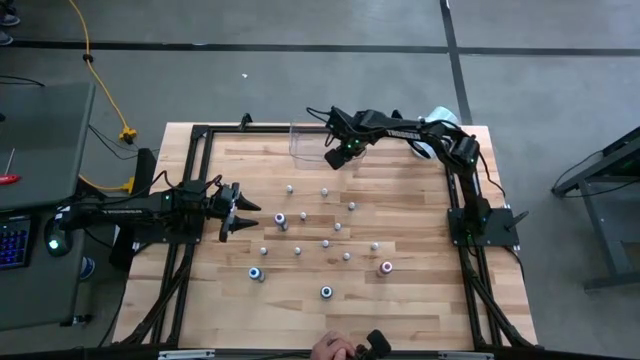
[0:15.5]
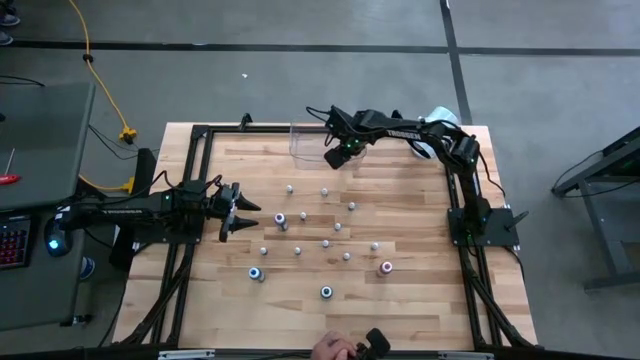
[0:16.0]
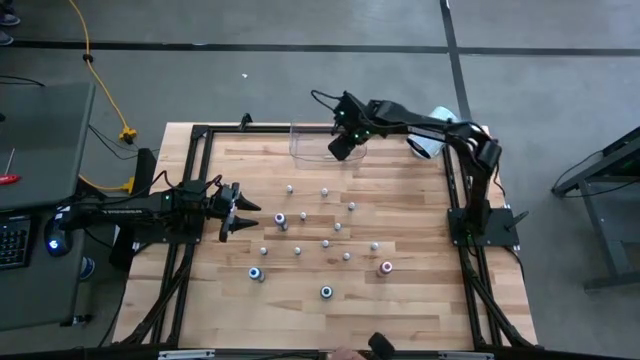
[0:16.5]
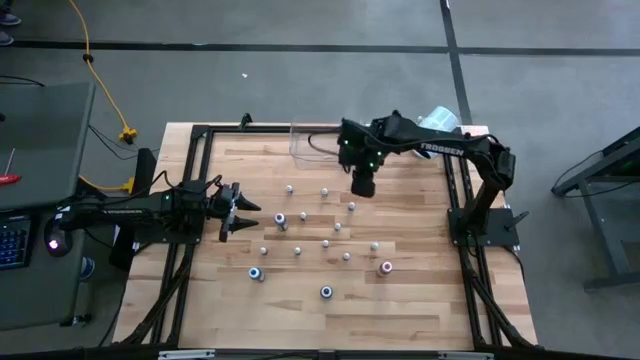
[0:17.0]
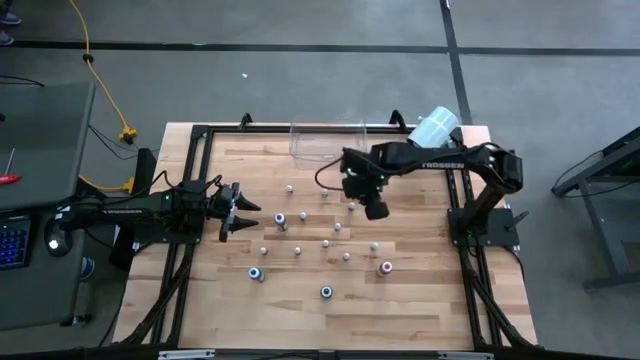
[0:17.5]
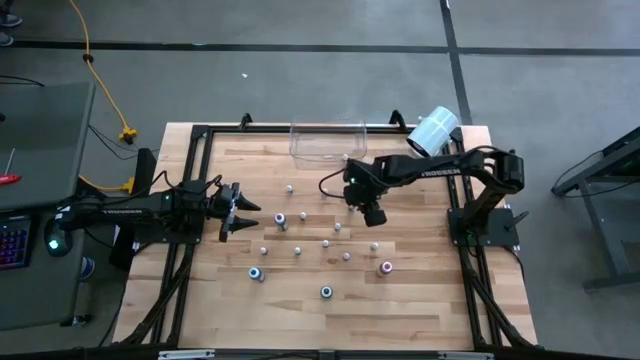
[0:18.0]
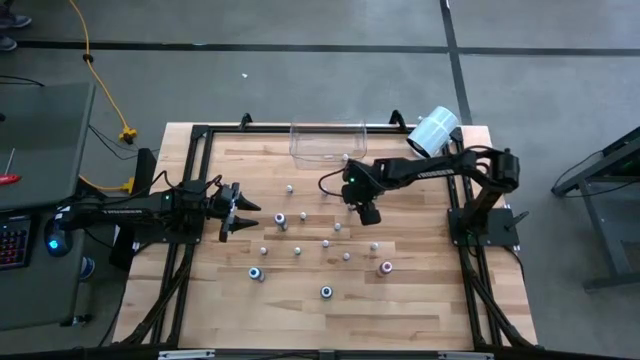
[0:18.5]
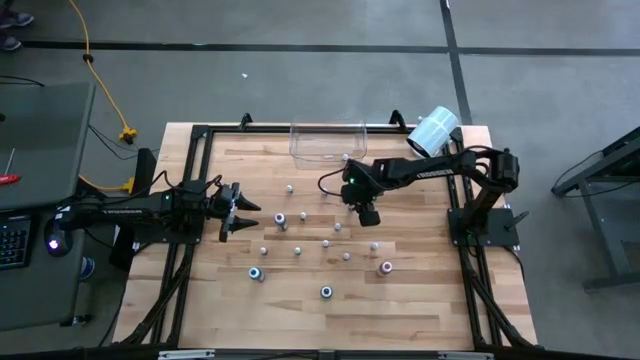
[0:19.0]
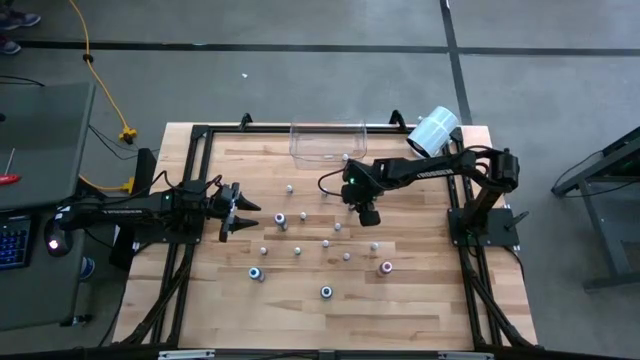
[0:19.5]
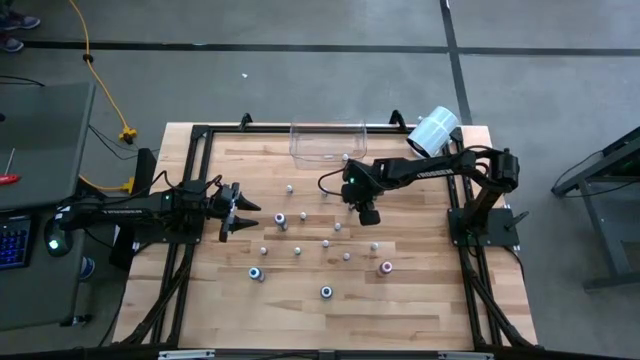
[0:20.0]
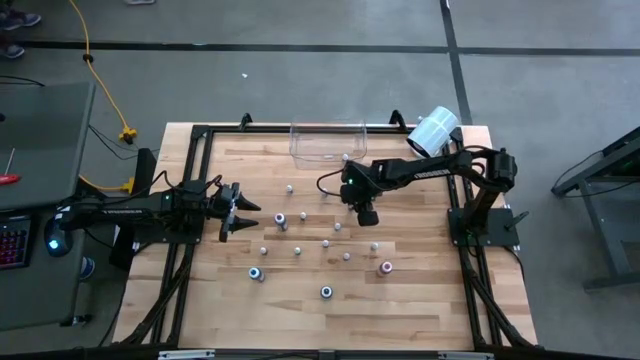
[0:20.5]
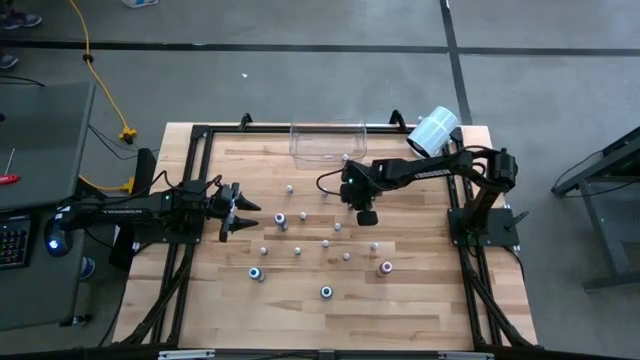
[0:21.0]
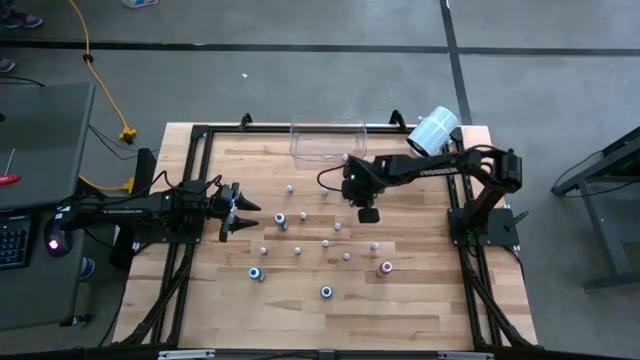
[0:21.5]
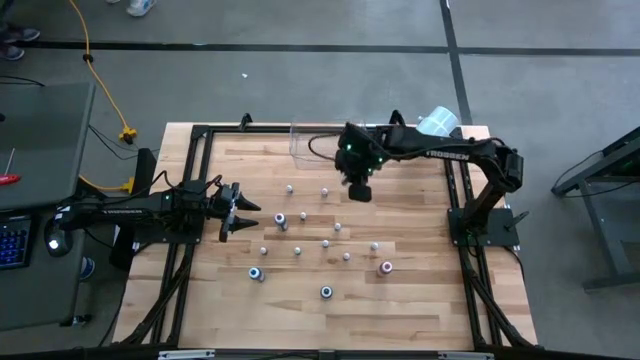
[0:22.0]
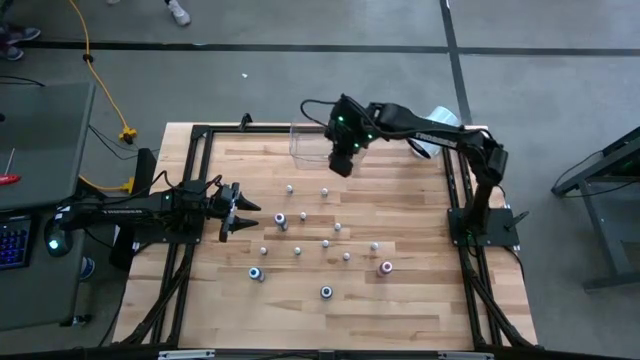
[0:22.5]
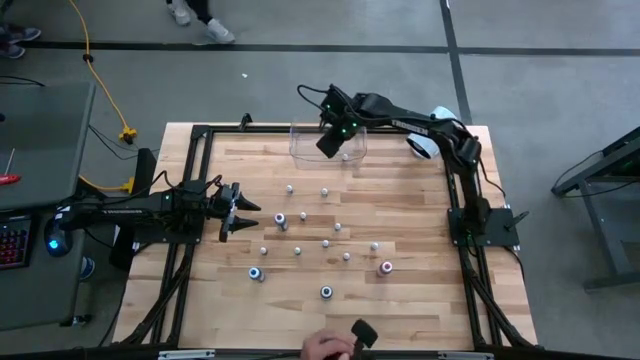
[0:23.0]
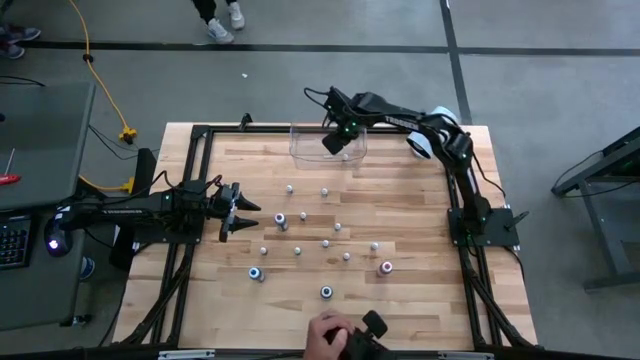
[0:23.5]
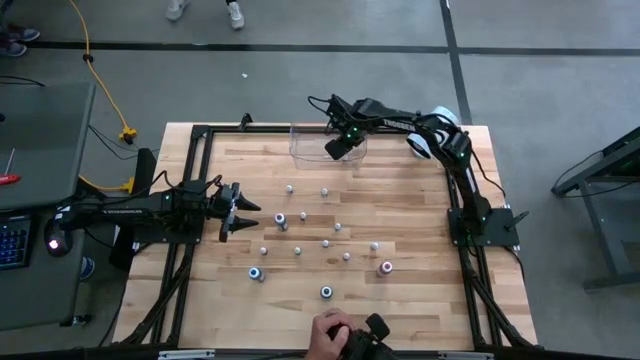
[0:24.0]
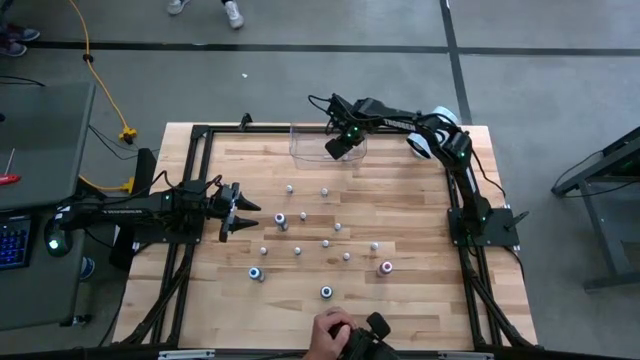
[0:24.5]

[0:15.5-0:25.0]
Task: Pick & Place food coloring
Put the small blue food coloring into the transparent container

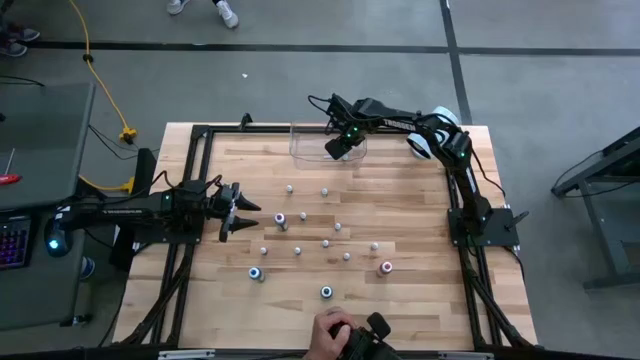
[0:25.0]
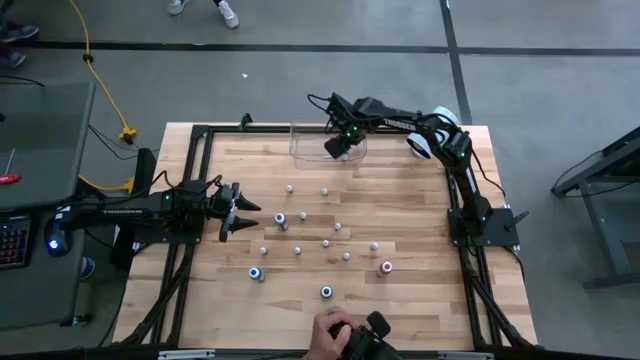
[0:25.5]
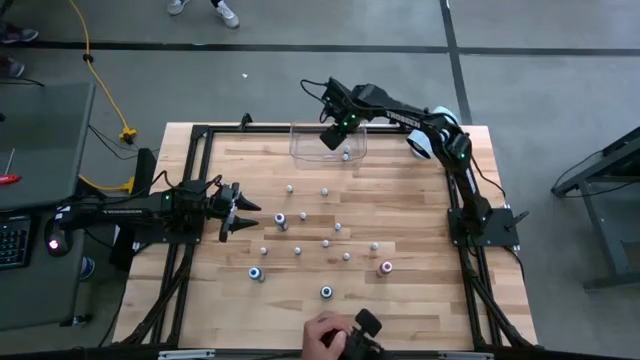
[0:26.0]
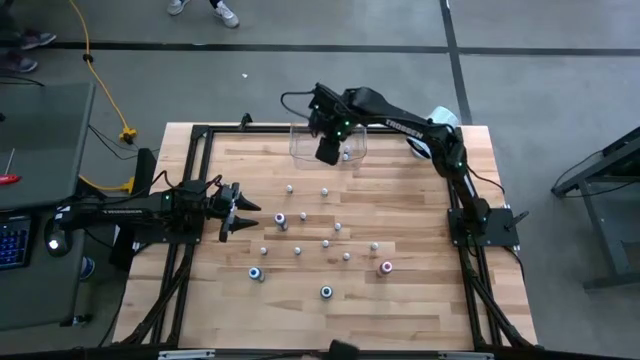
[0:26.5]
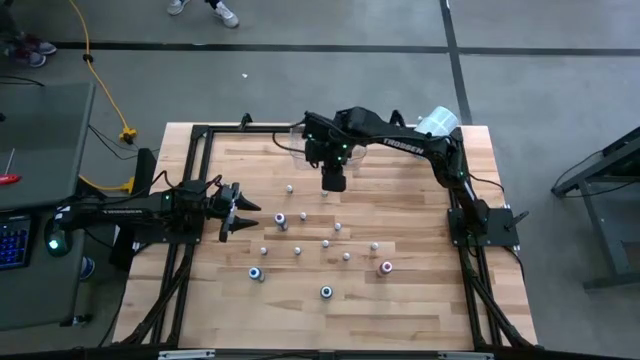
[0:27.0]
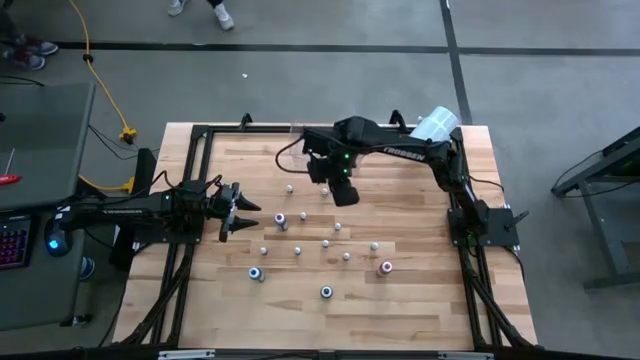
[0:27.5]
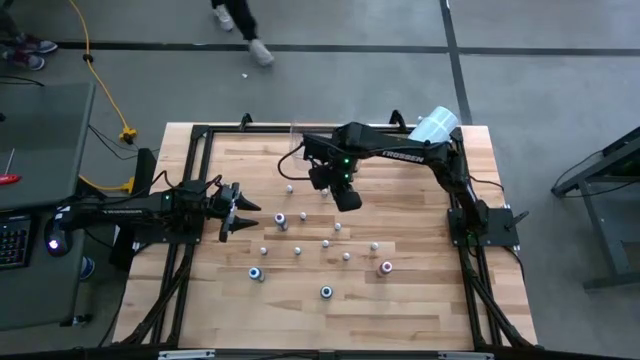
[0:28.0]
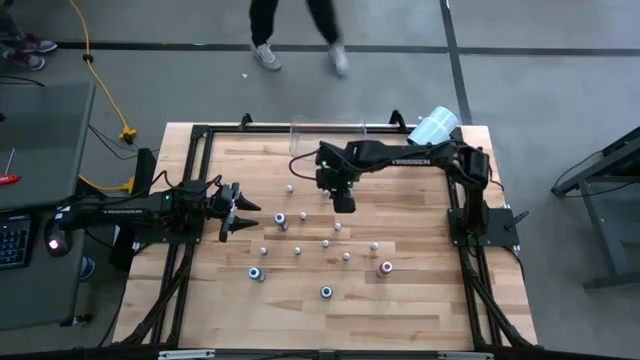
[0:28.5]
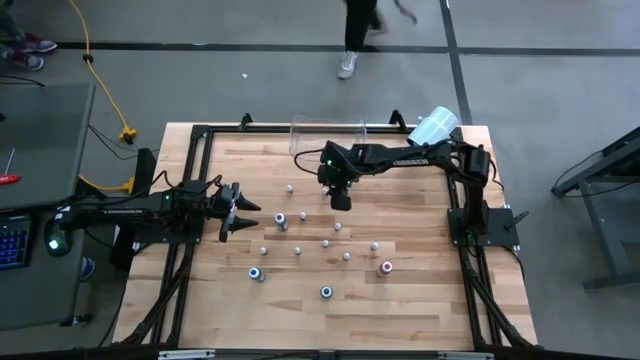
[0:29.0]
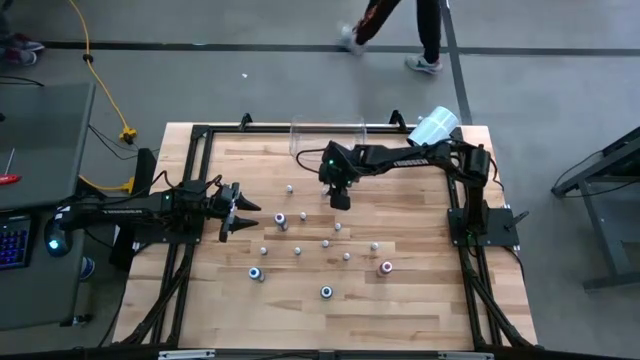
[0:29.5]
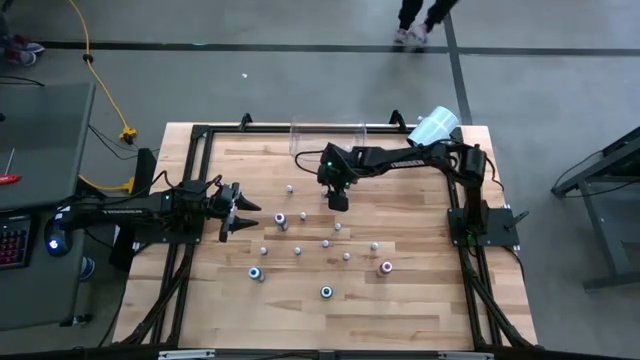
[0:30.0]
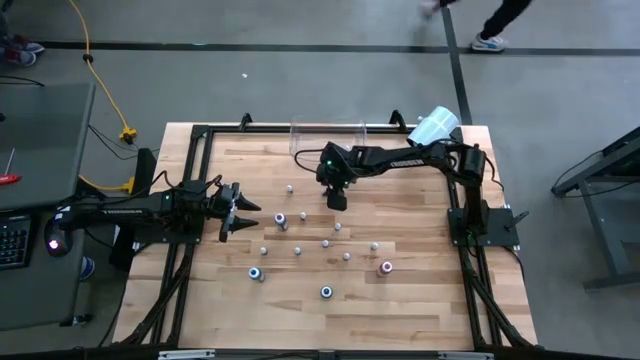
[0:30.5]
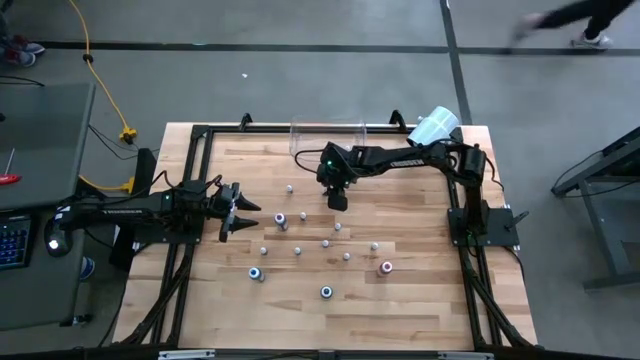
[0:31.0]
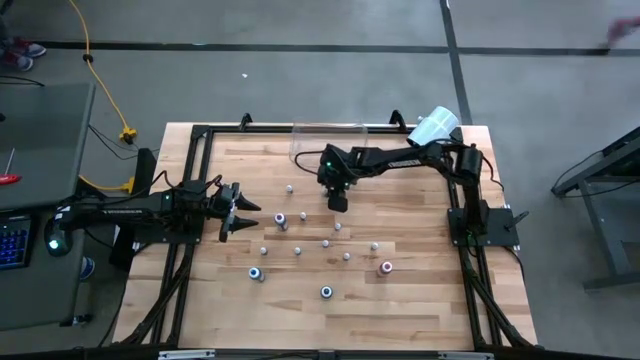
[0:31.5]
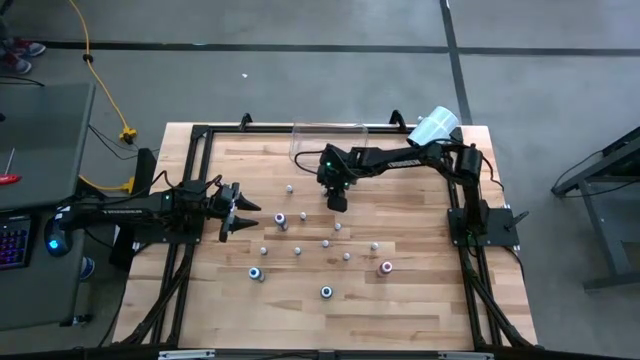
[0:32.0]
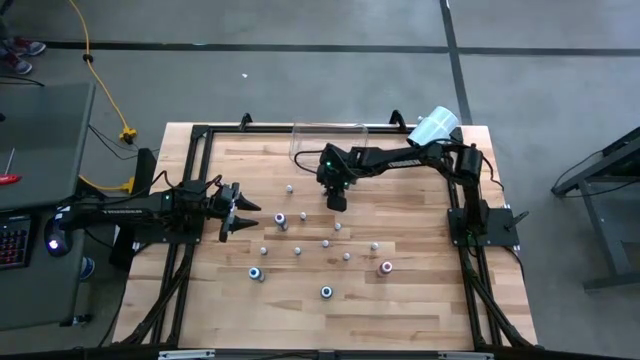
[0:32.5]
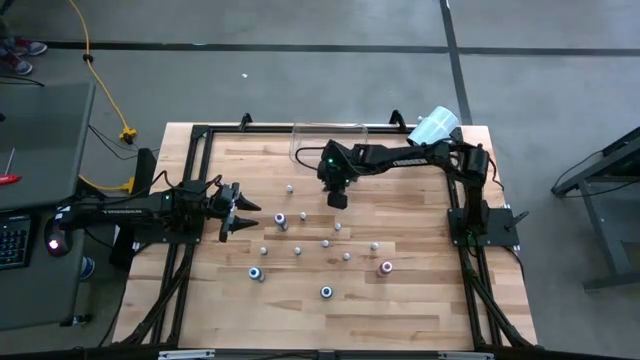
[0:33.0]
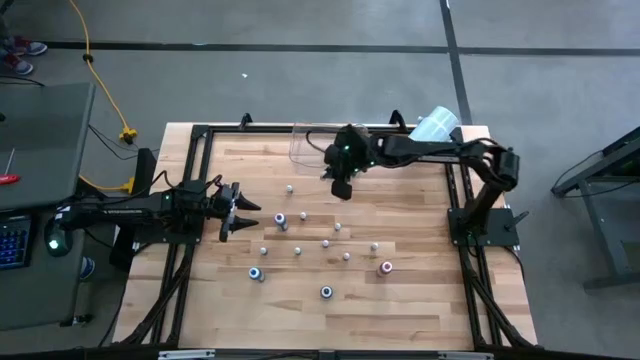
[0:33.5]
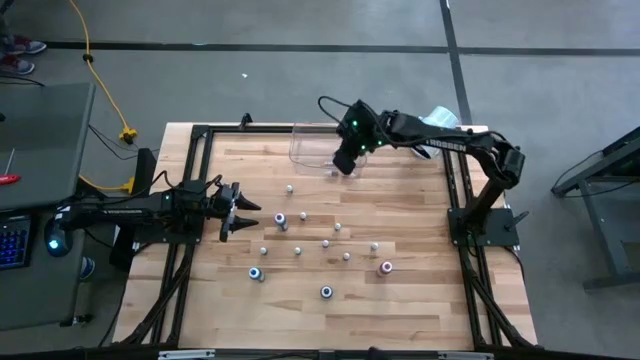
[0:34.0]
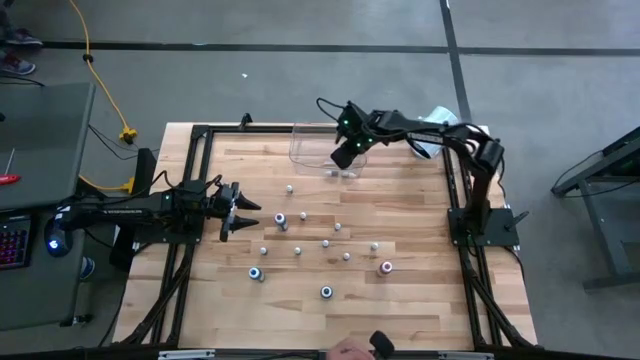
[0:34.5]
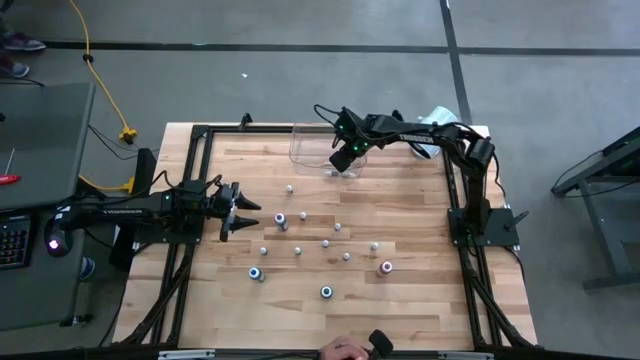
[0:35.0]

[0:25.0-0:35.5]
Put the small purple food coloring into the transparent container

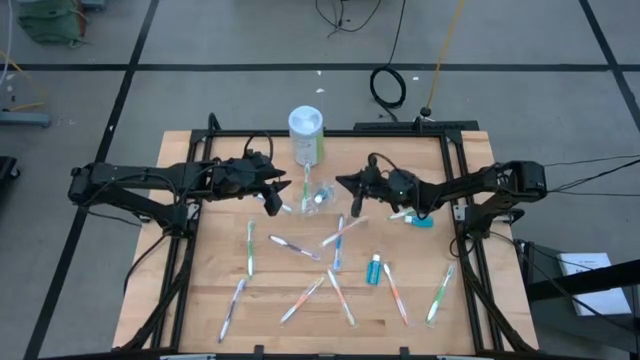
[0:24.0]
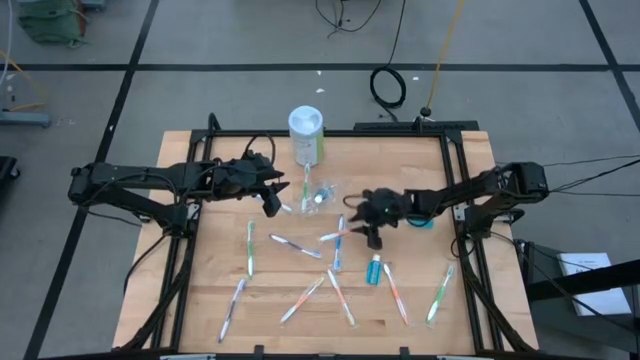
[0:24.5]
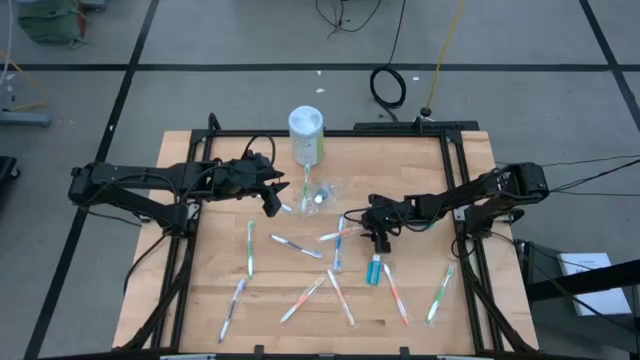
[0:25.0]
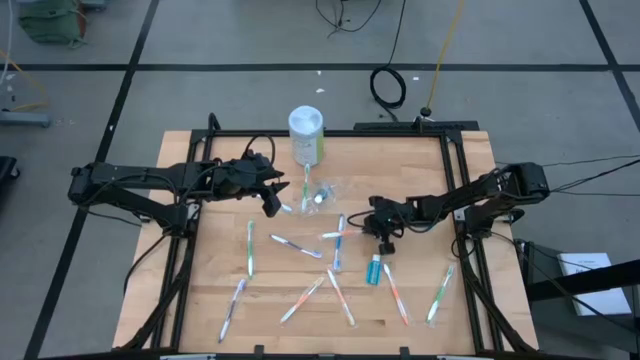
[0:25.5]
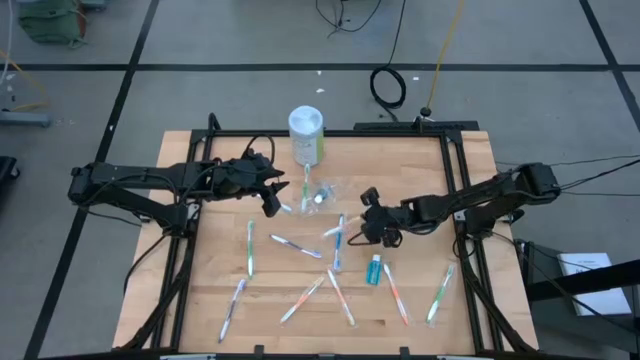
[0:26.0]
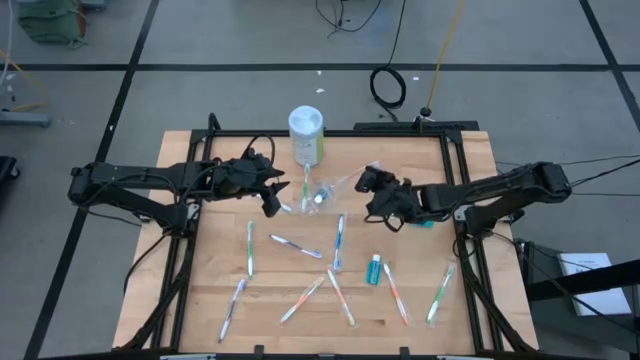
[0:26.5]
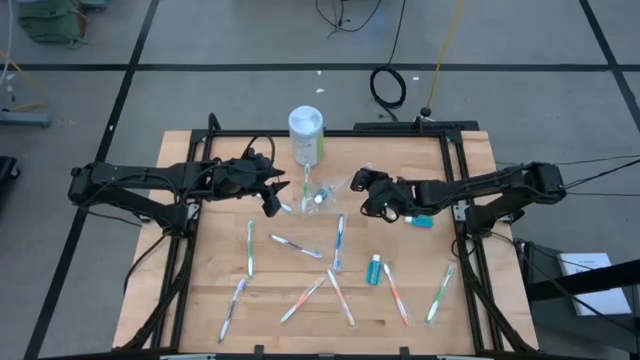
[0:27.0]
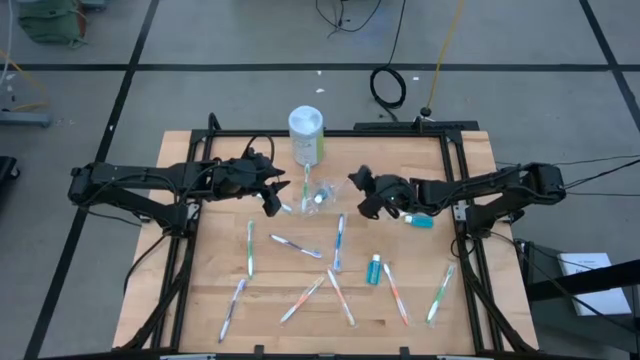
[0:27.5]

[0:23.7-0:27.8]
Task: Pick & Place toothbrushing station
Put the orange toothbrush into the transparent organizer
